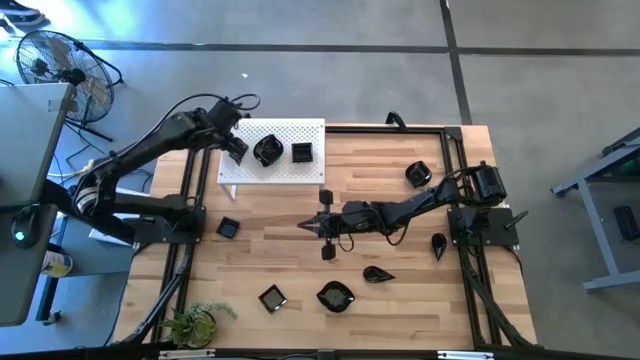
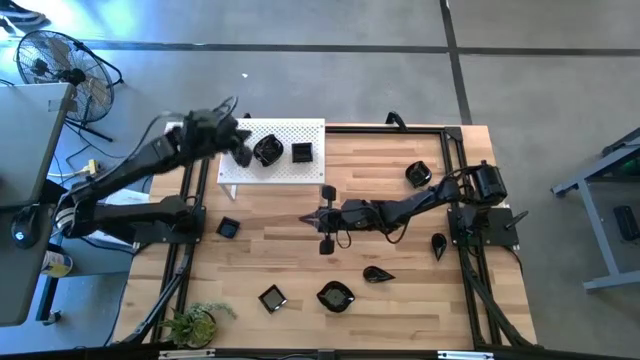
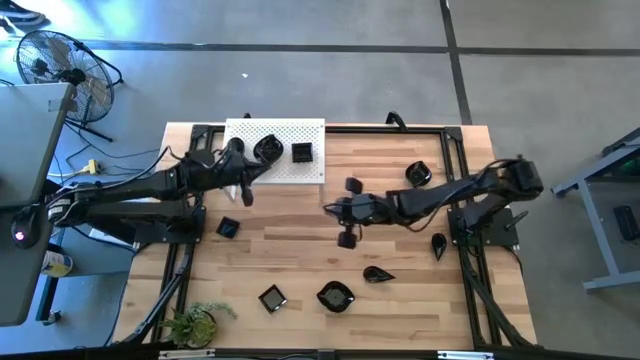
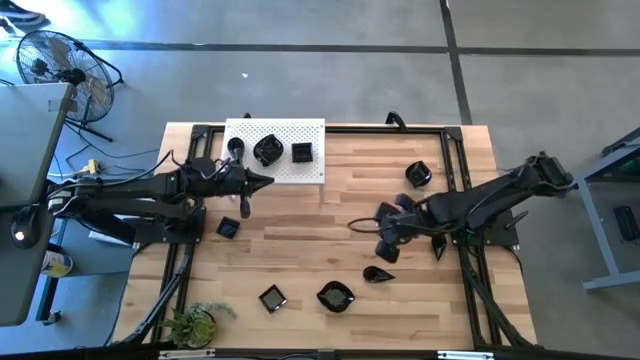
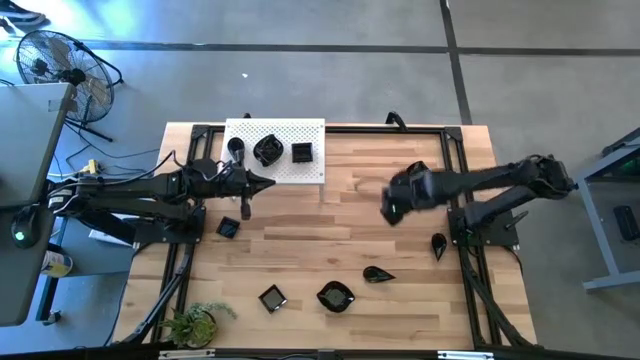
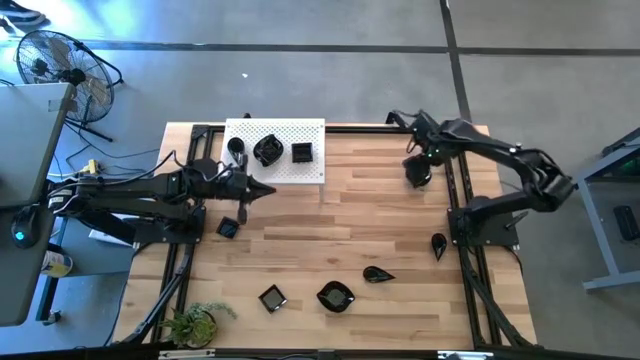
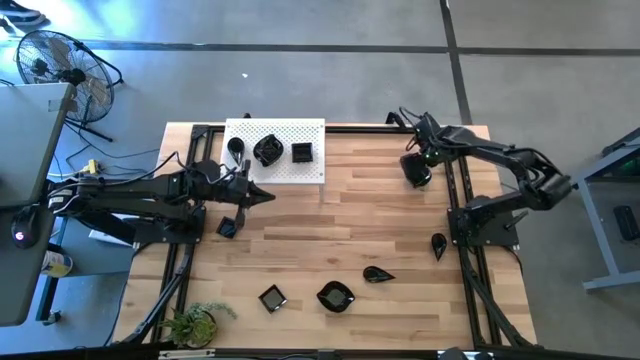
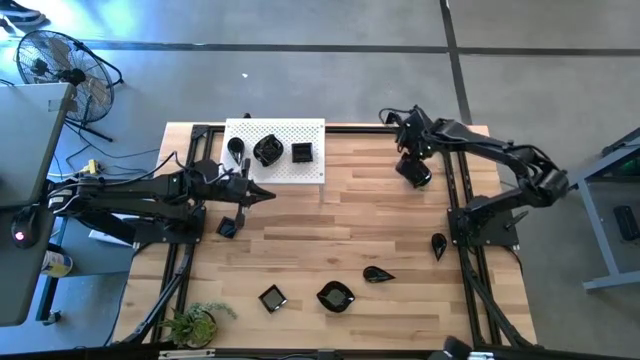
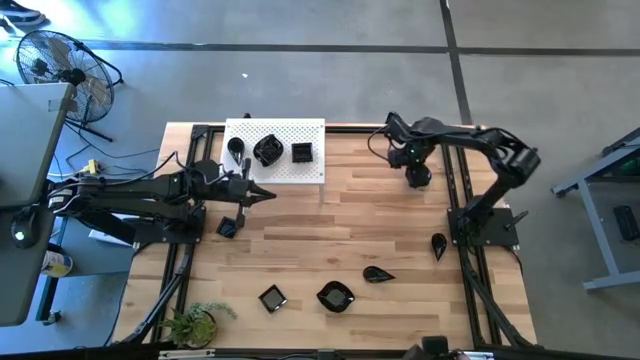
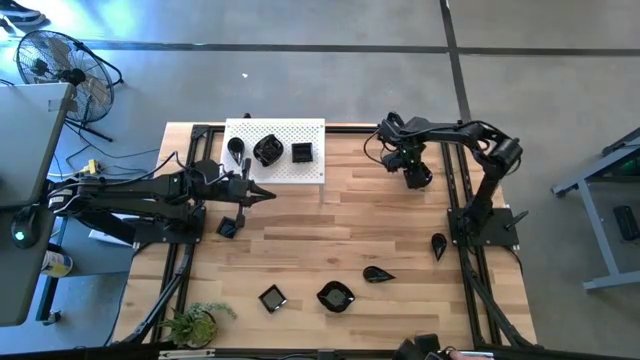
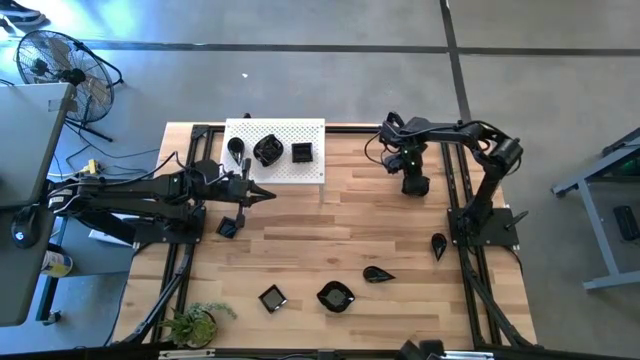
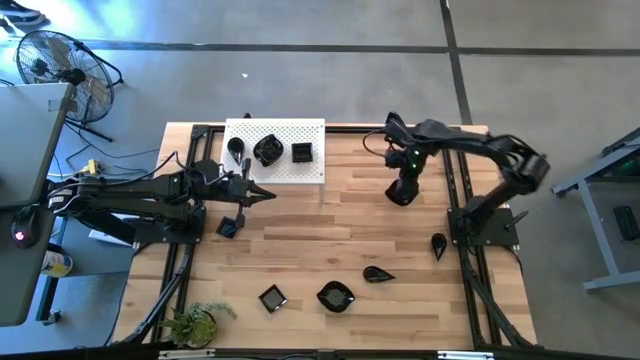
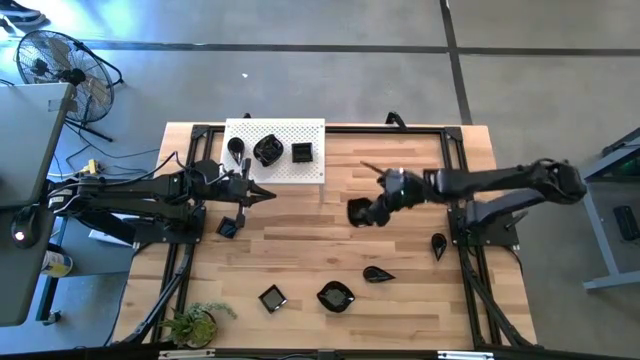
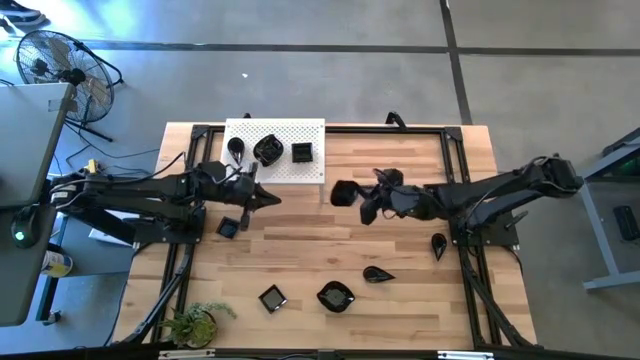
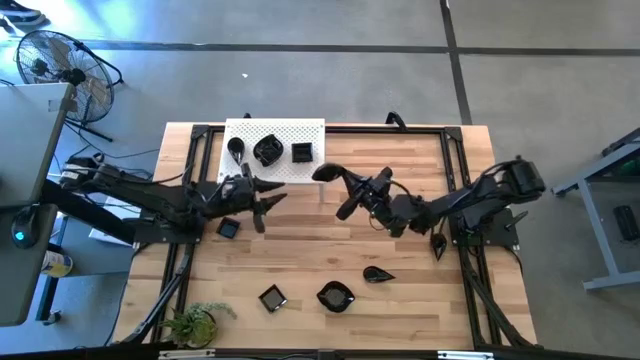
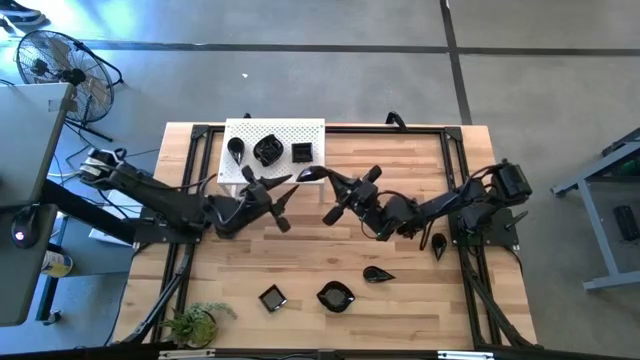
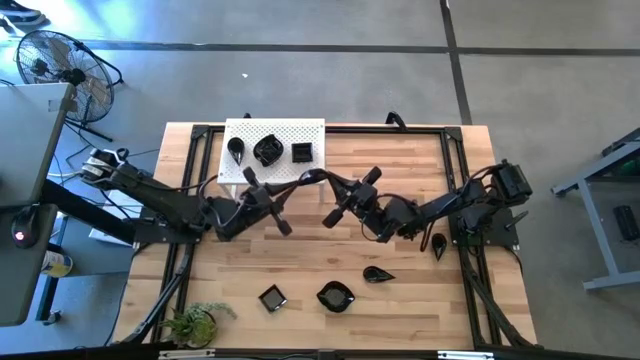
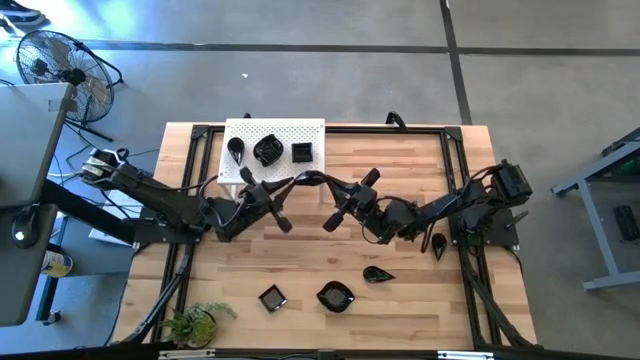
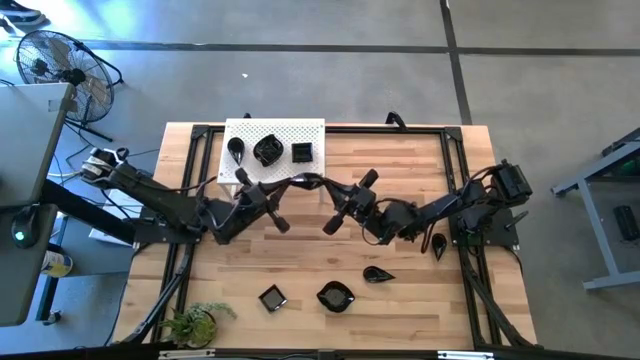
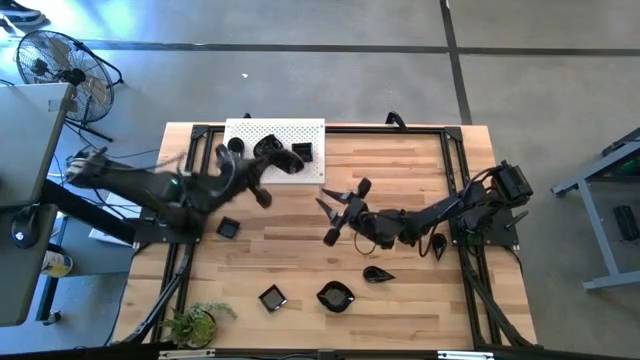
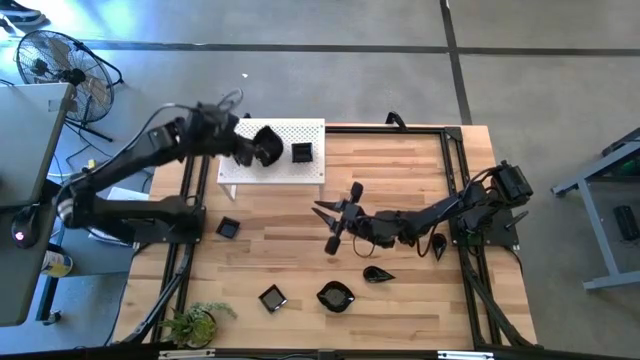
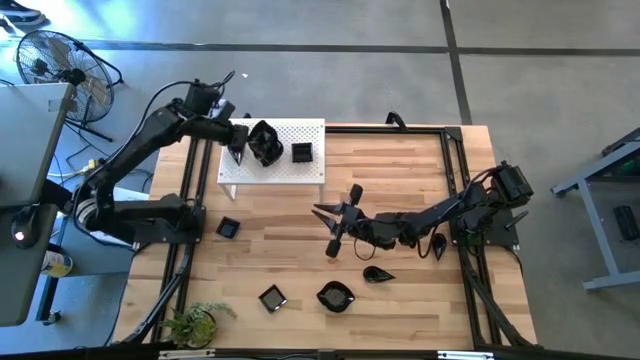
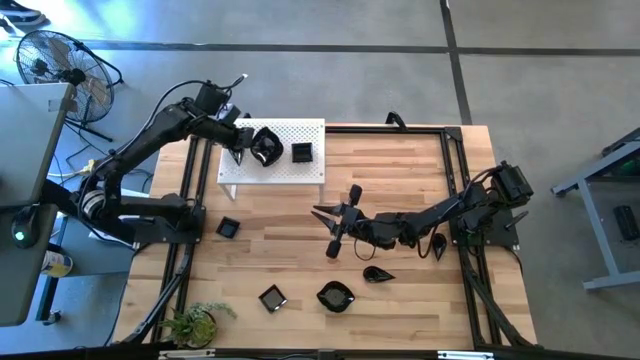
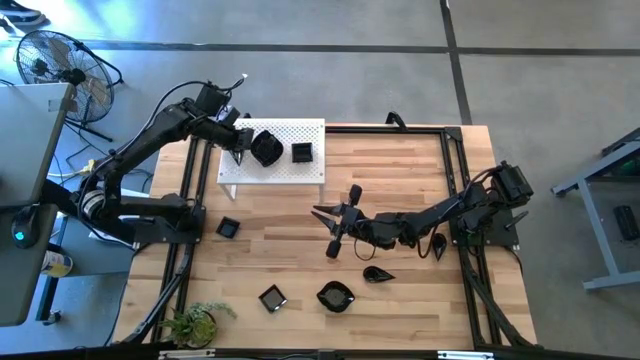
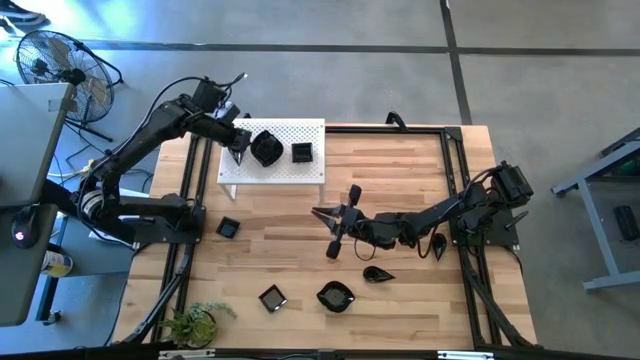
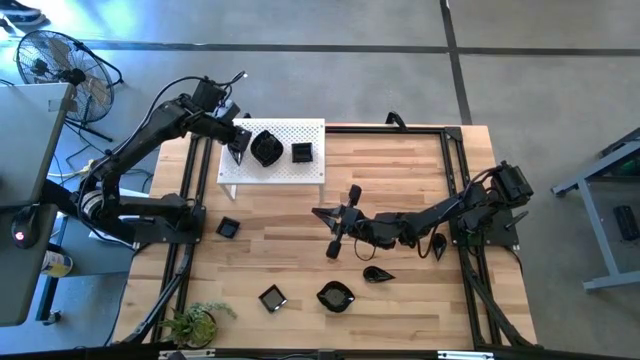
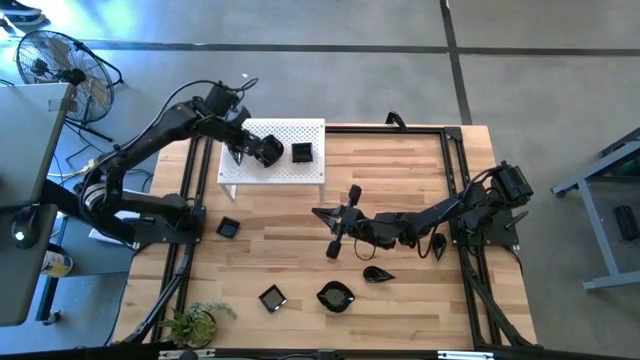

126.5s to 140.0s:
Task: Pick & Place Mini shaped plates
Stack the leaf-shaped plate on top of the leaf-shaped plate on the shelf

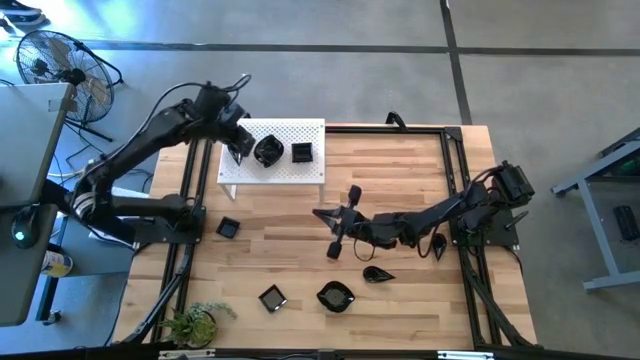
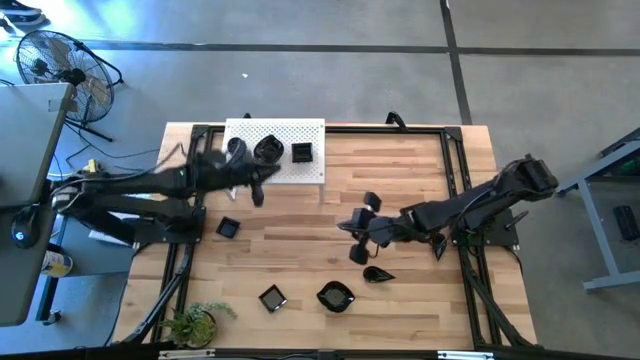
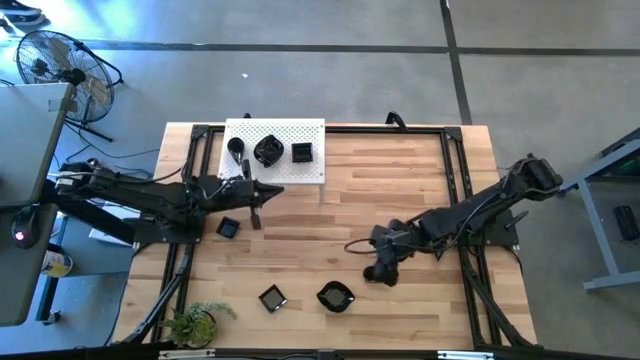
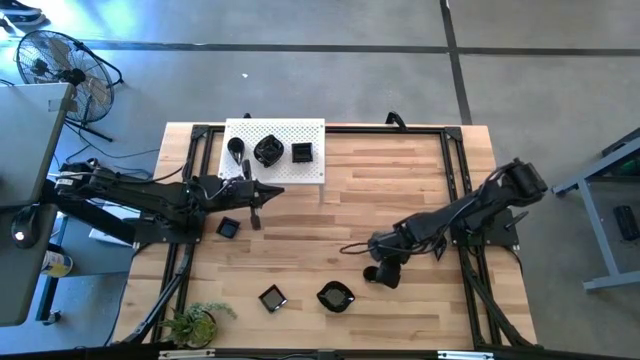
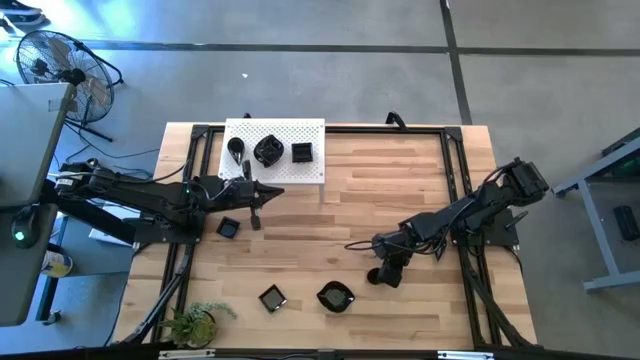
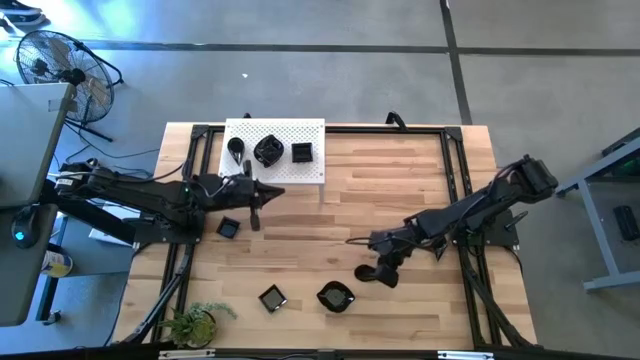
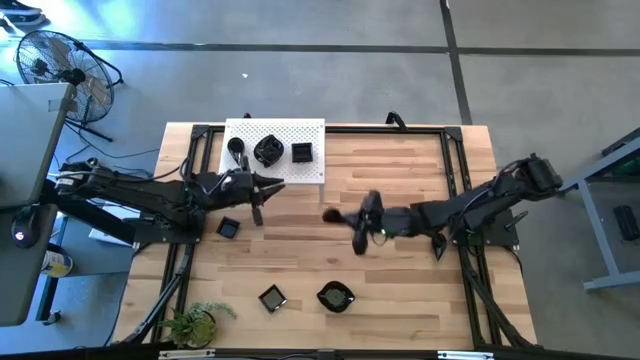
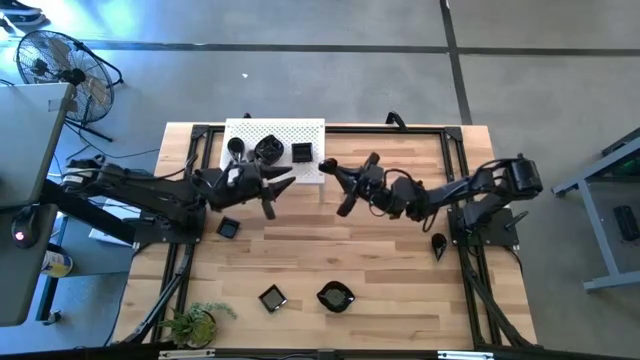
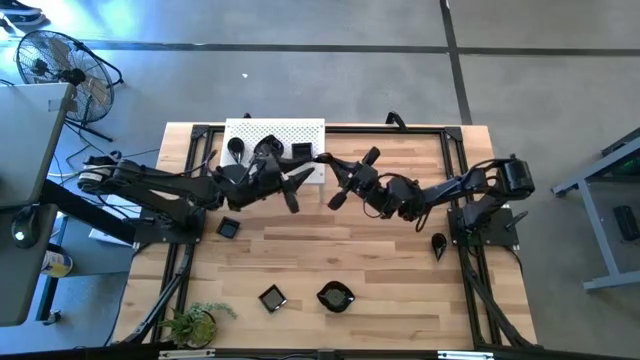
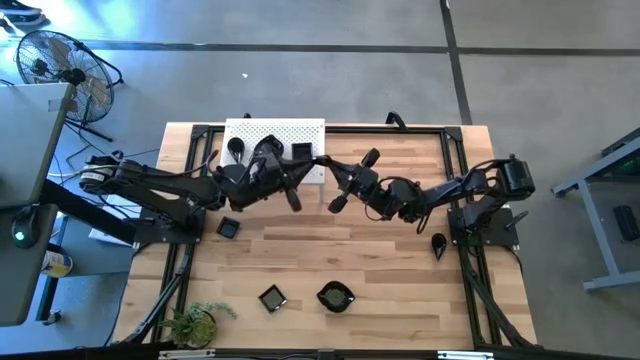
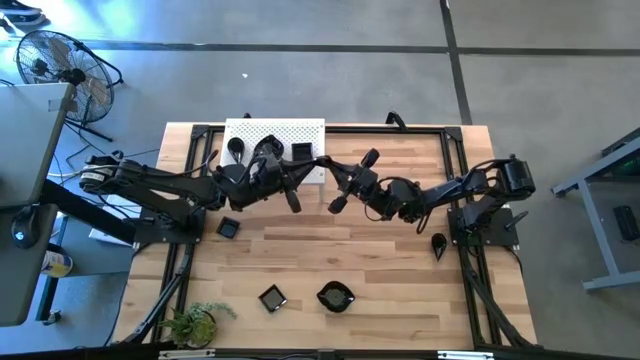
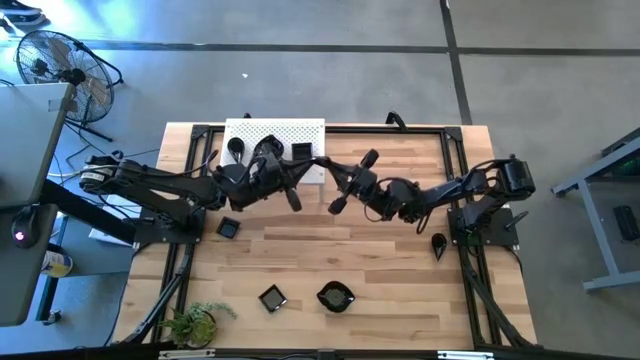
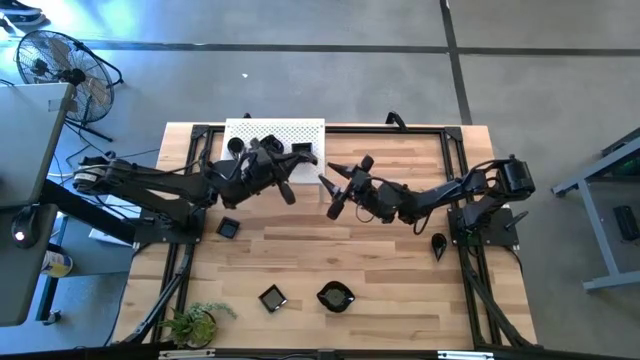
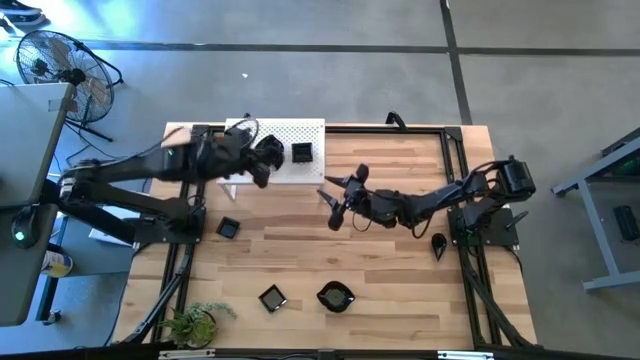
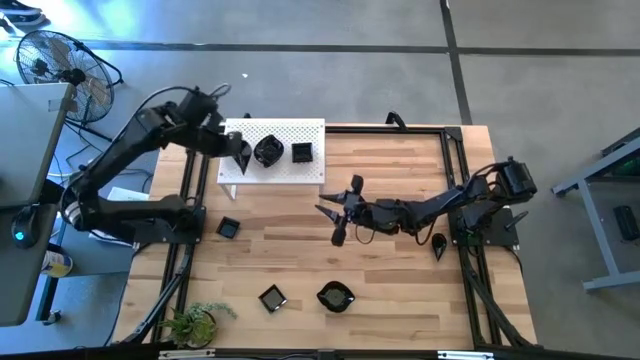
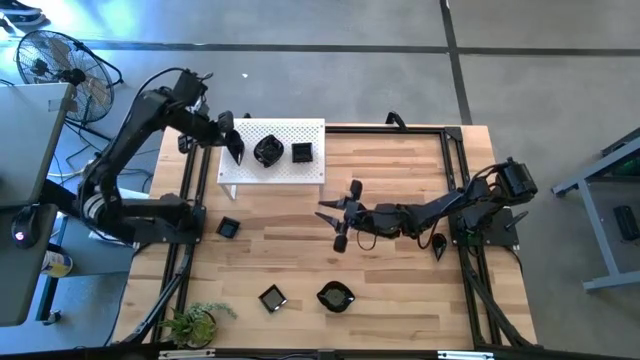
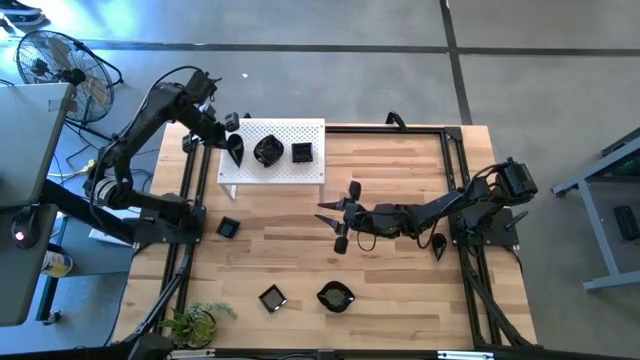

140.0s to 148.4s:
Stack the drop-shaped plate on top of the drop-shaped plate on the shelf
